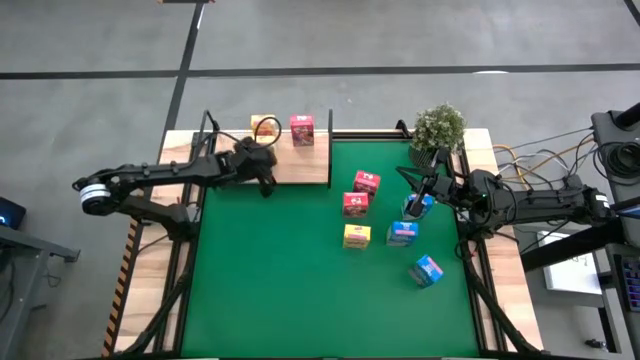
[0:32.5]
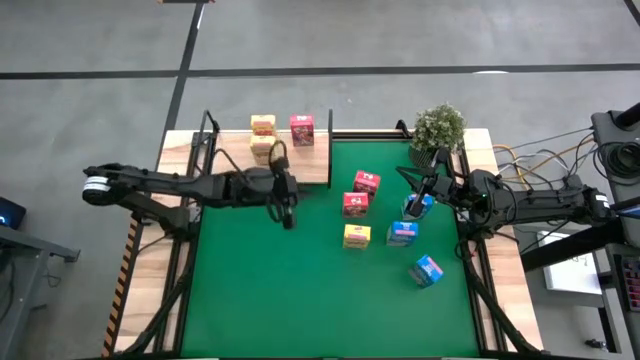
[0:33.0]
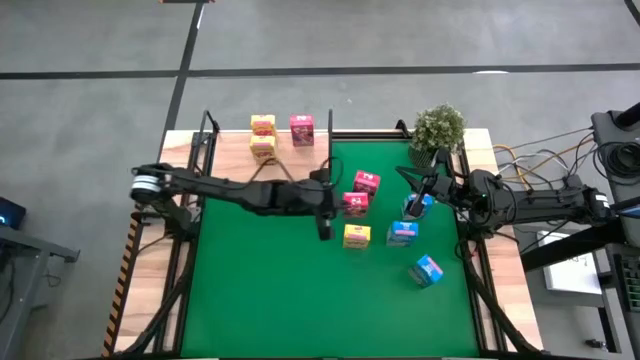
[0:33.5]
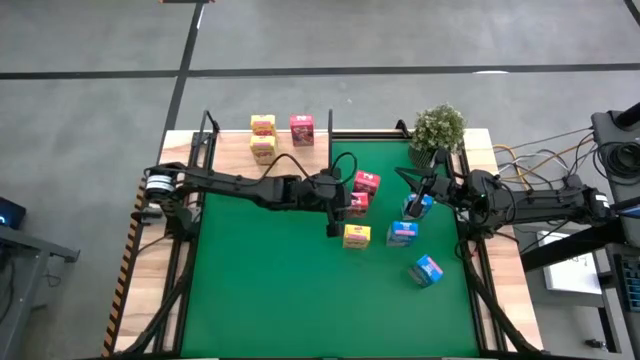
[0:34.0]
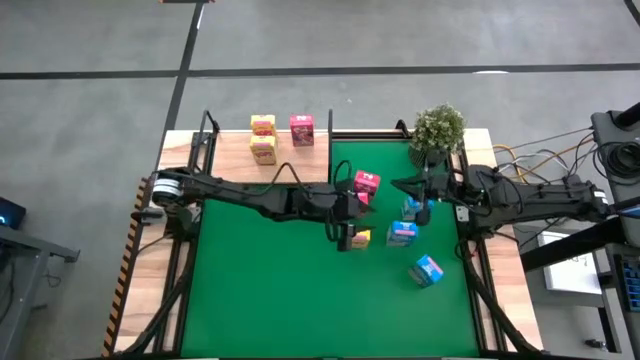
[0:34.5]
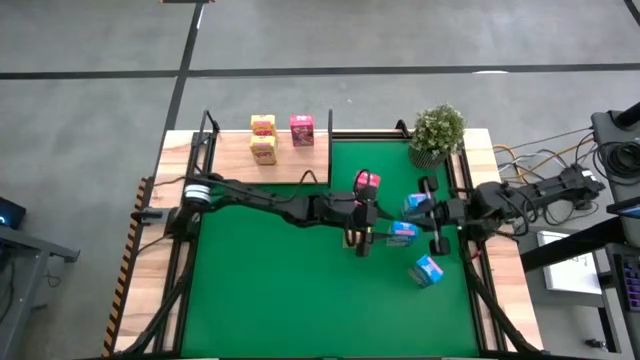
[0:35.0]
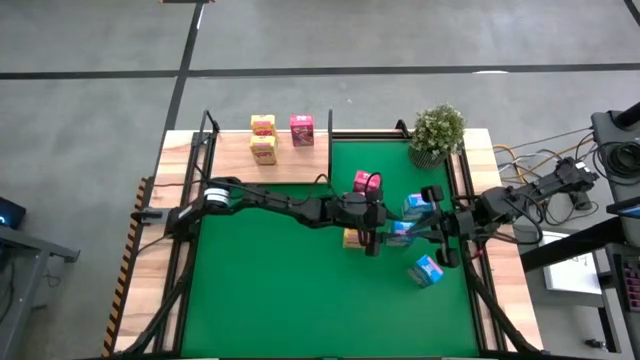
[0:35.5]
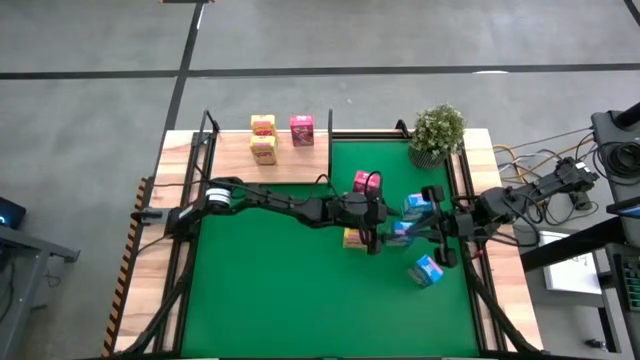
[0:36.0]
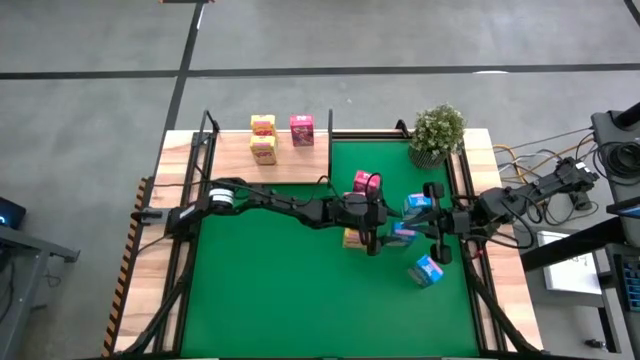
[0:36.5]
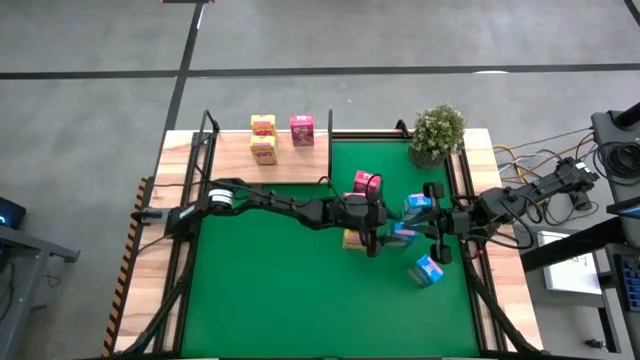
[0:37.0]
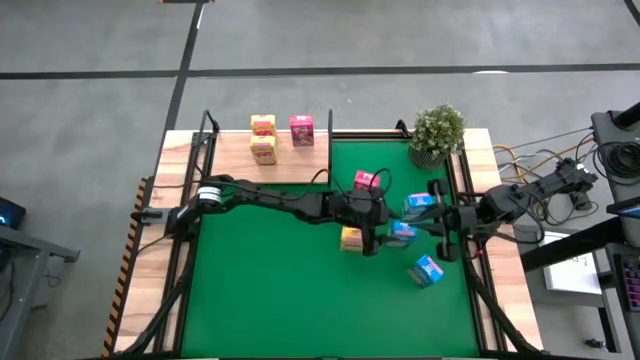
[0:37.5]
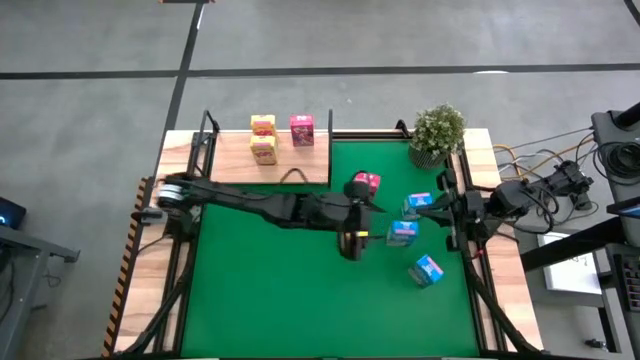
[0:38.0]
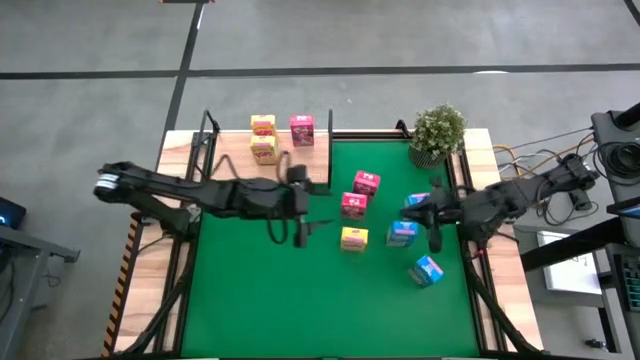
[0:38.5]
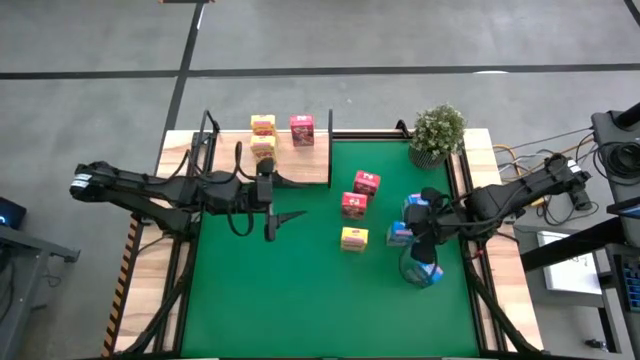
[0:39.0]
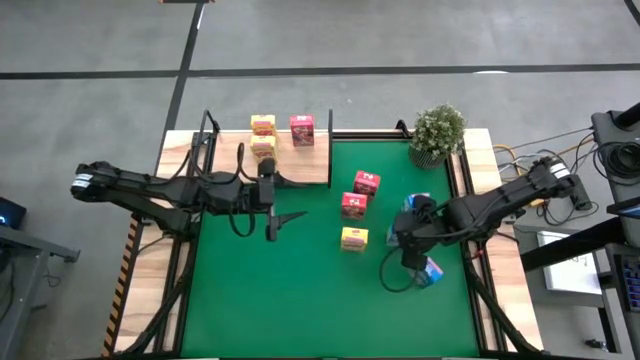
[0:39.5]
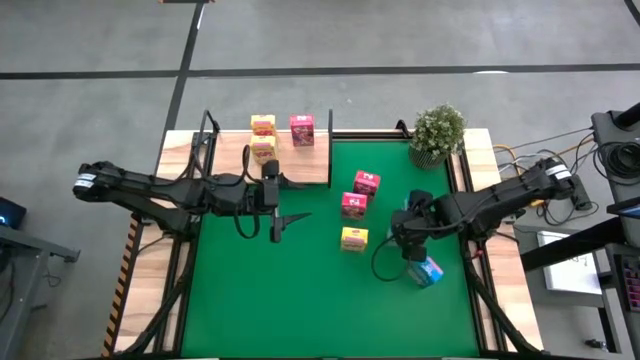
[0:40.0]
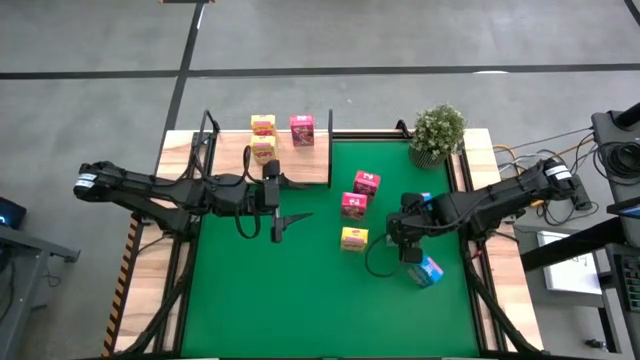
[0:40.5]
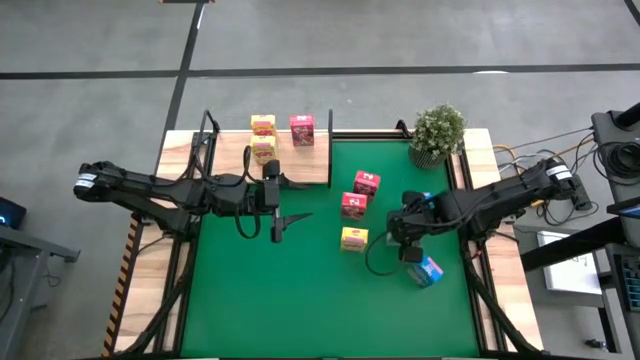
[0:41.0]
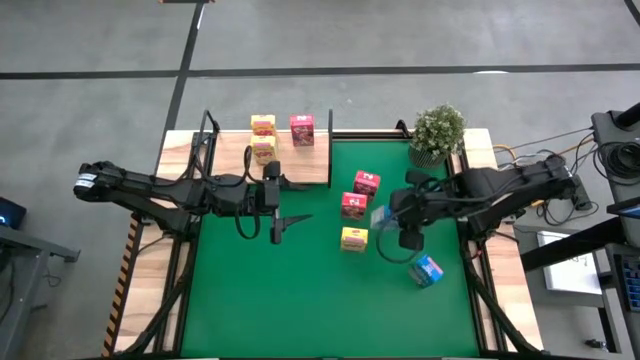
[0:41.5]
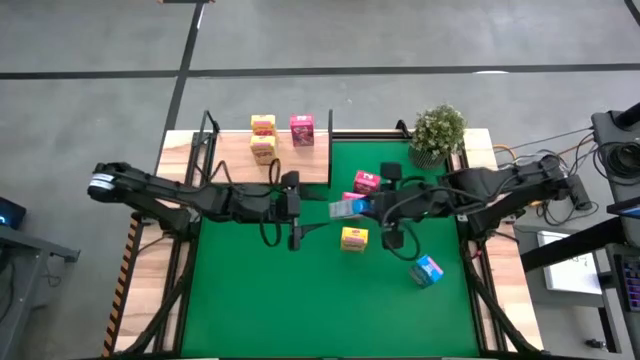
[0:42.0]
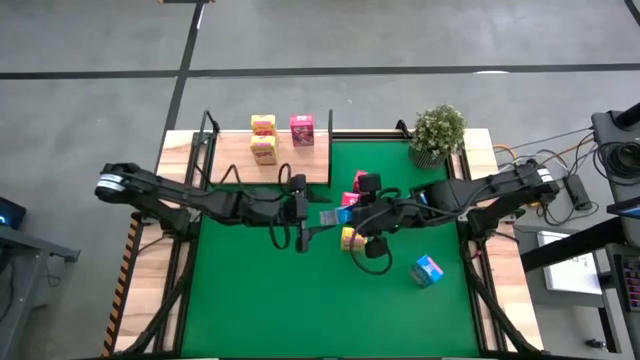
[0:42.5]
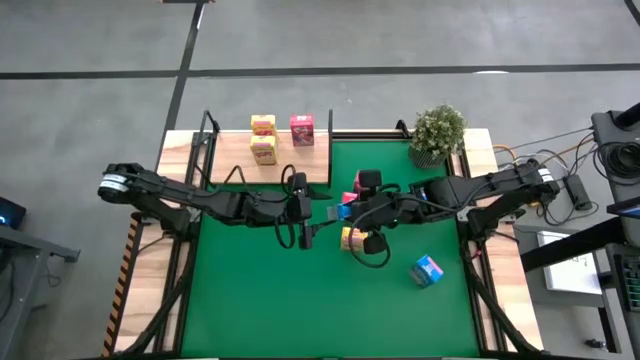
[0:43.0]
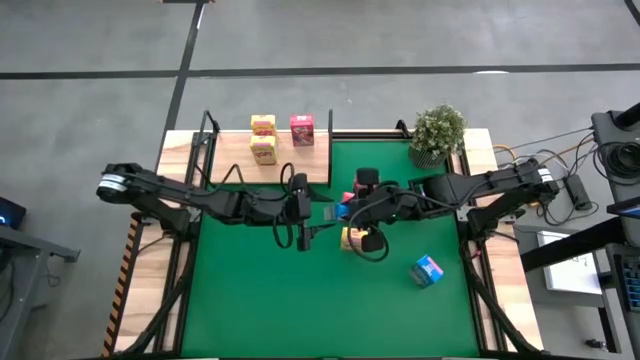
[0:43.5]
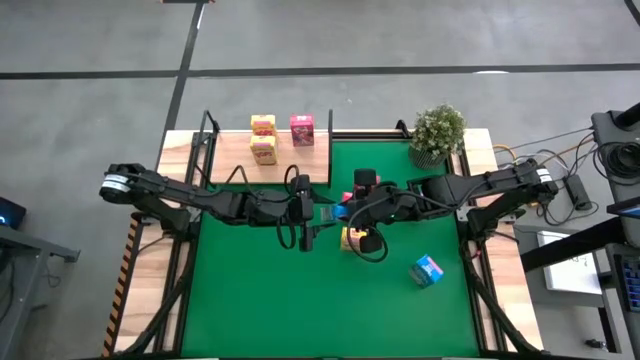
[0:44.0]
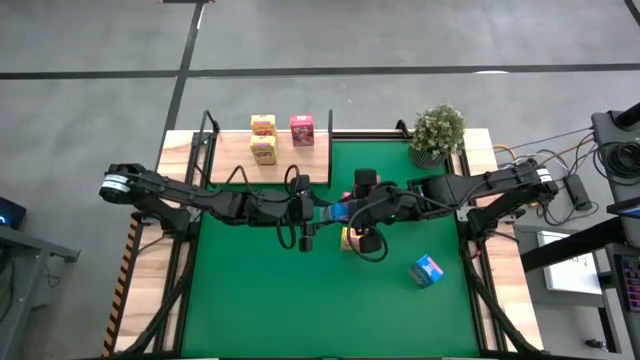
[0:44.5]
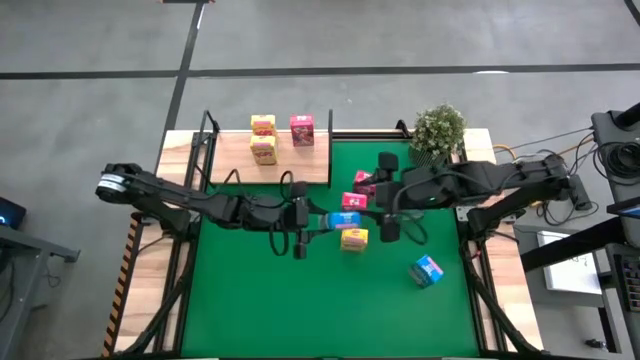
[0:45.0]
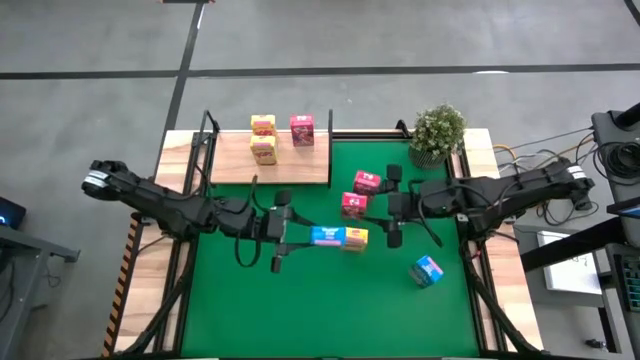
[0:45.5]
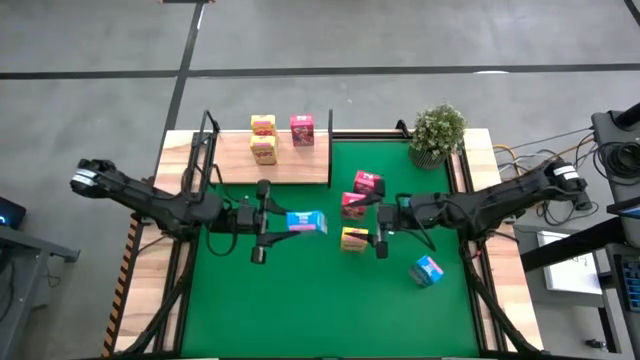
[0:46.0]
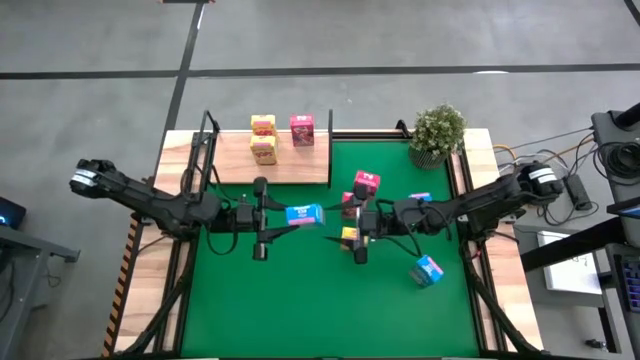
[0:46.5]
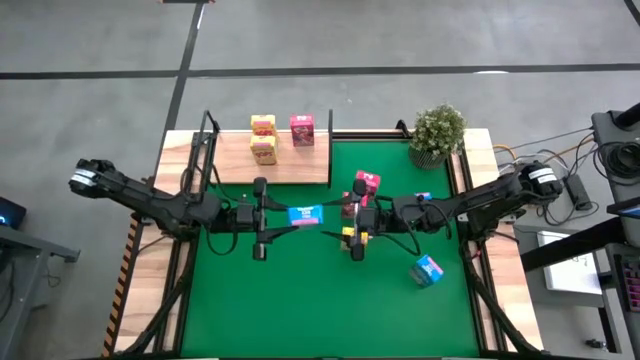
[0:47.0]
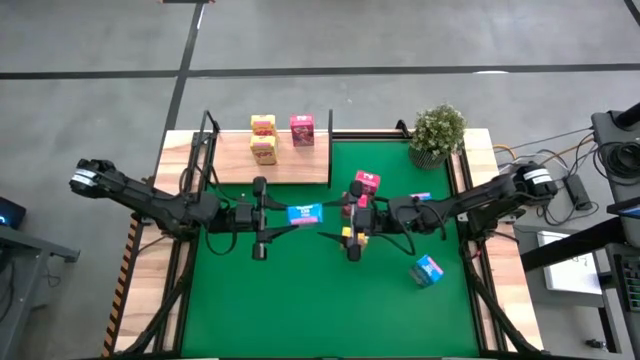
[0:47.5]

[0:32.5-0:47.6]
Task: Stack cereal on shelf
Put the middle blue cereal box on the shelf

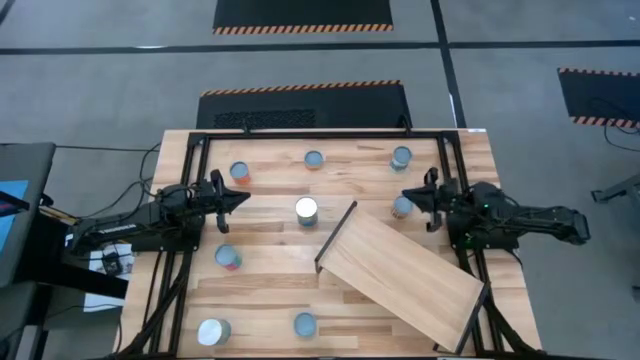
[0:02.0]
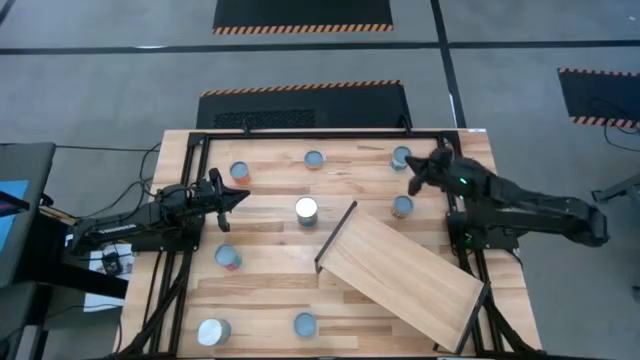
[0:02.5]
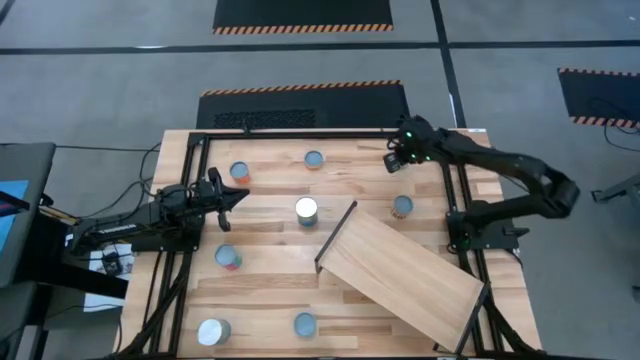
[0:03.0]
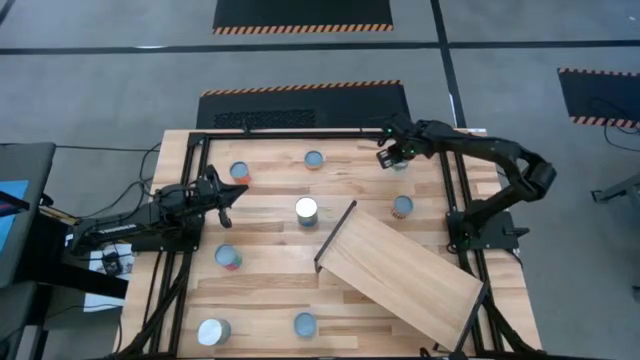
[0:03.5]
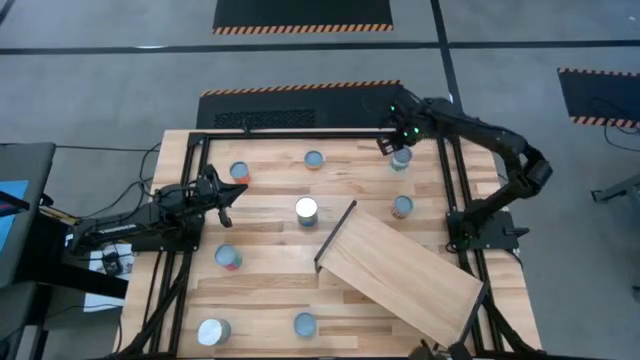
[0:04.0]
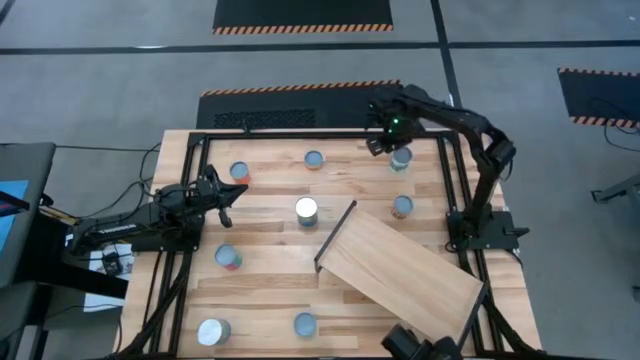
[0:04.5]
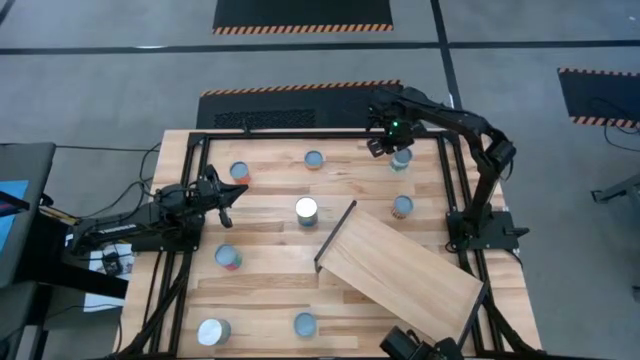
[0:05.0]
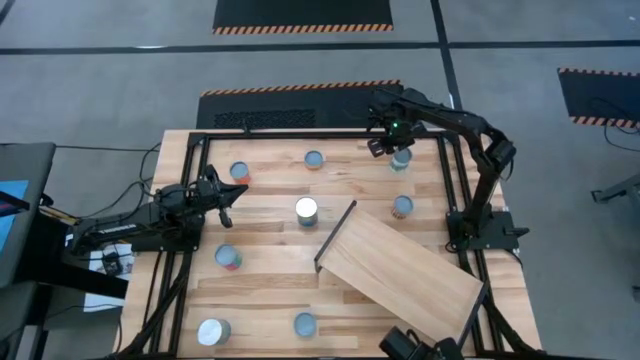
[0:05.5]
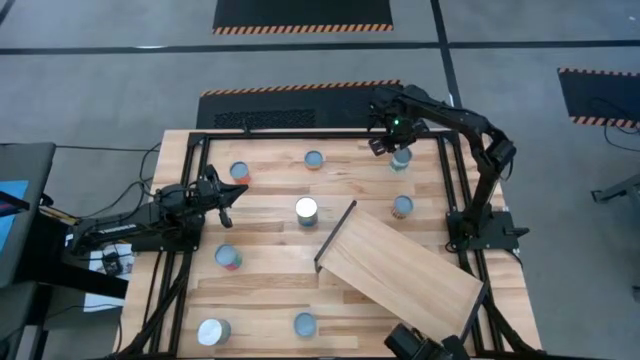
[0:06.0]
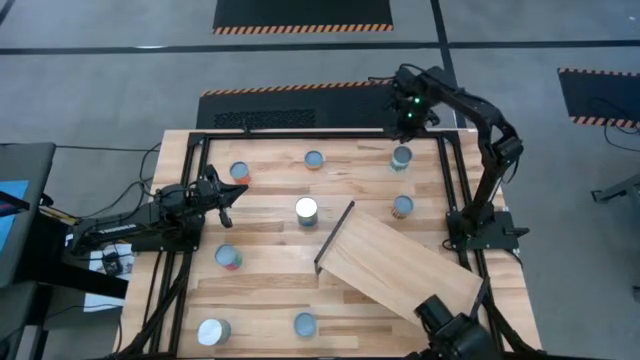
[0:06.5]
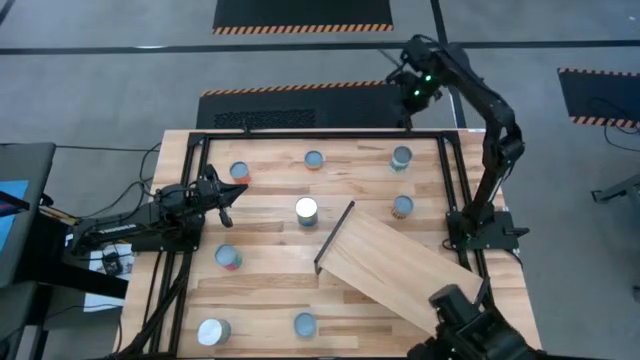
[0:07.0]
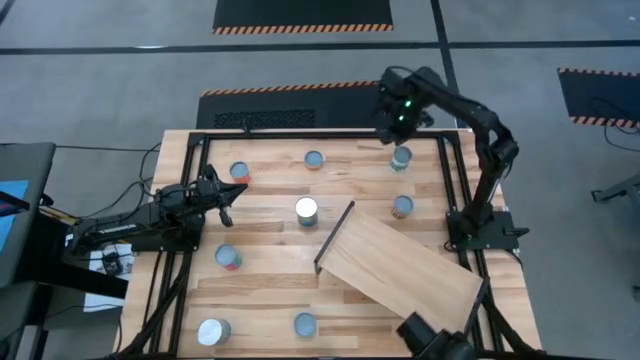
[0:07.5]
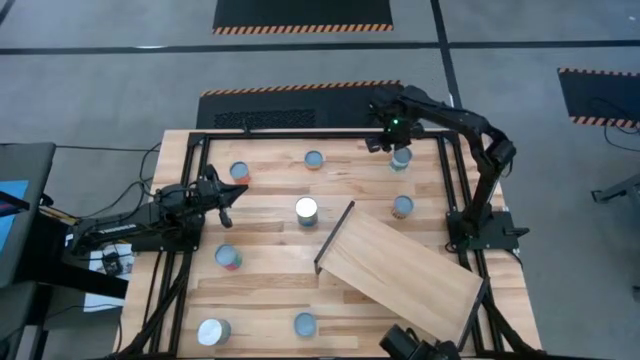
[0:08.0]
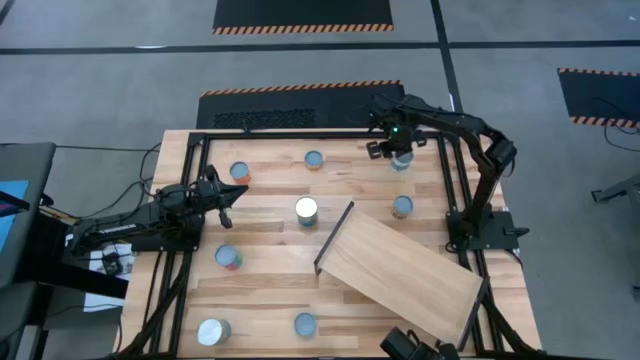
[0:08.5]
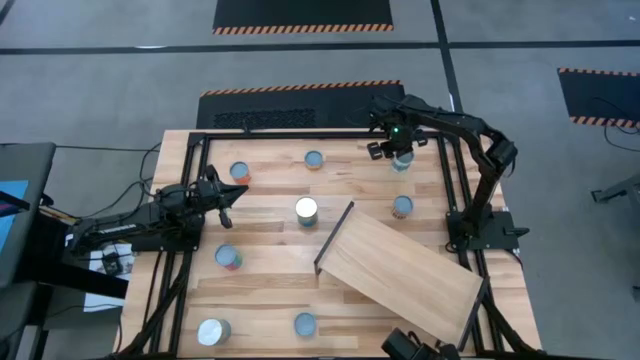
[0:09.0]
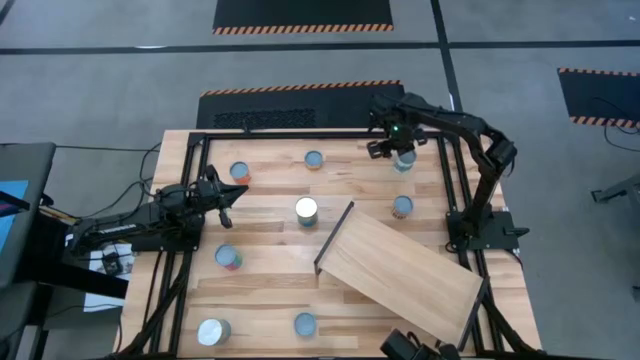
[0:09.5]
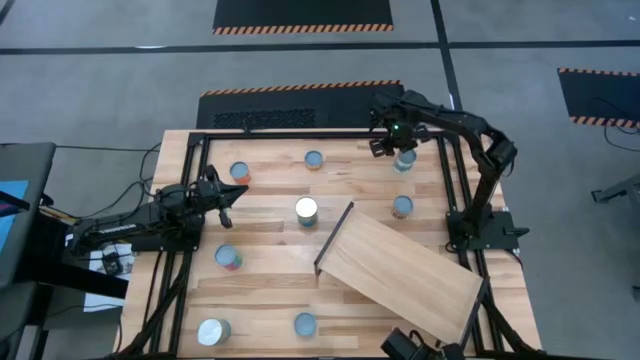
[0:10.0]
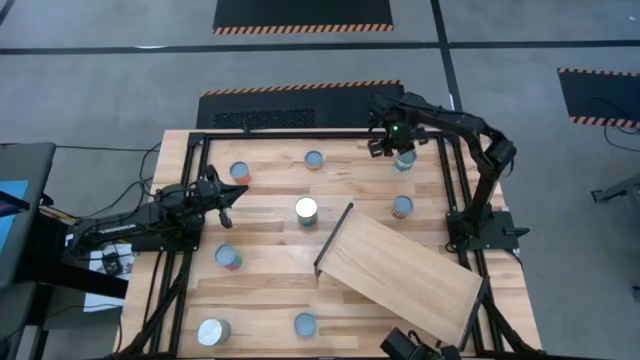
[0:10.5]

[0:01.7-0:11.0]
Task: Pick and place cans onto a shelf
Put the canned mixed vegetables on the shelf
